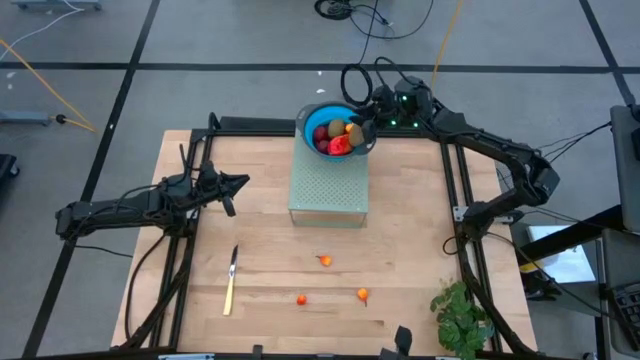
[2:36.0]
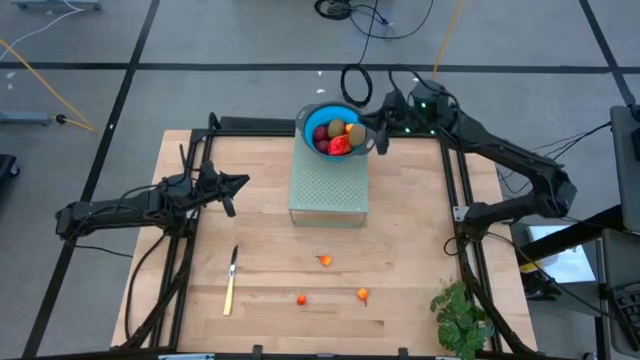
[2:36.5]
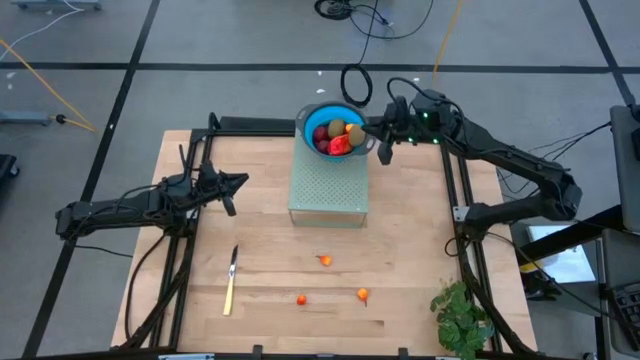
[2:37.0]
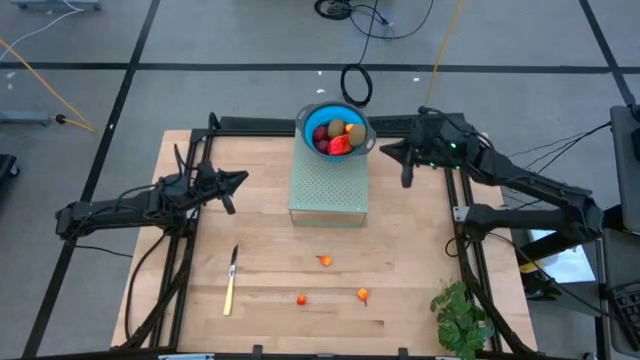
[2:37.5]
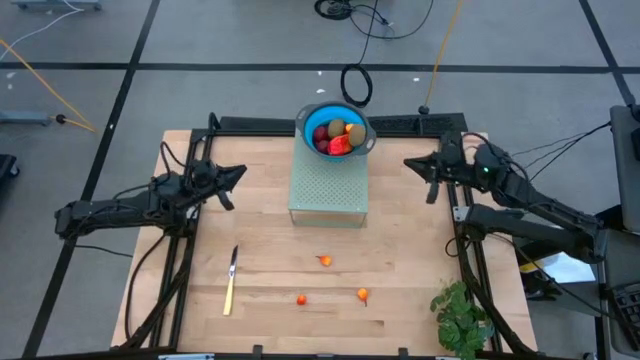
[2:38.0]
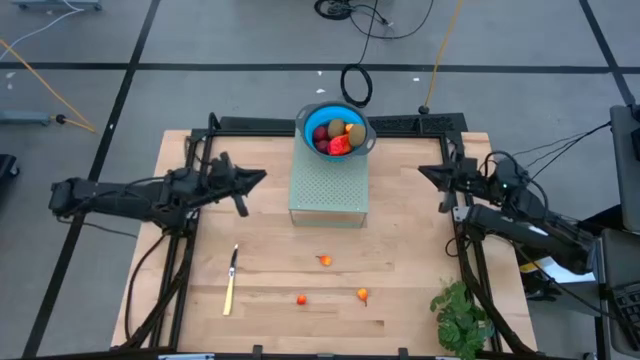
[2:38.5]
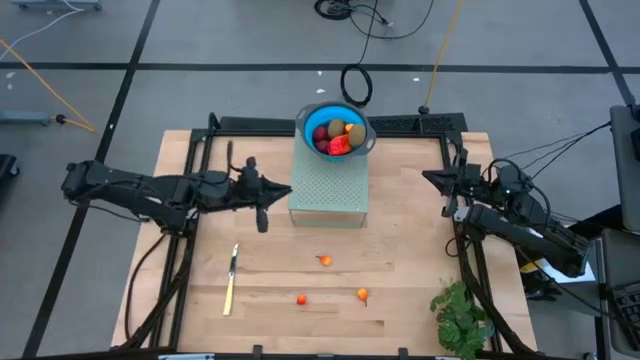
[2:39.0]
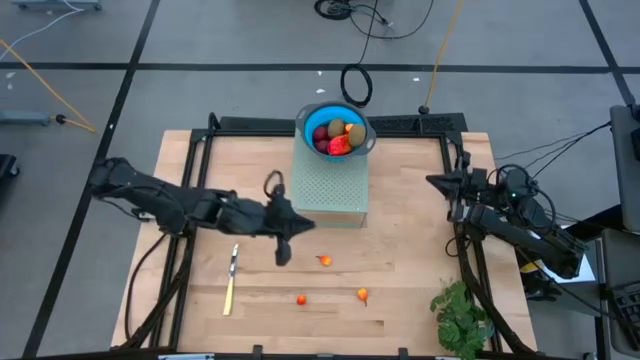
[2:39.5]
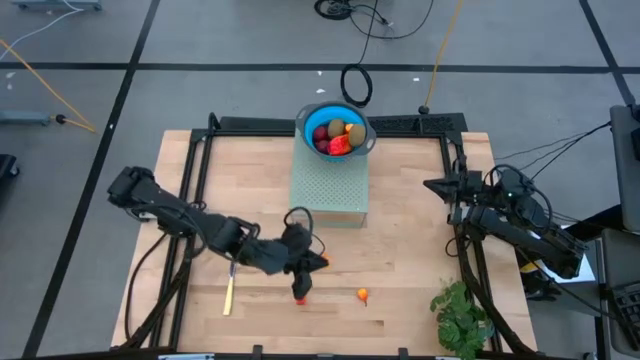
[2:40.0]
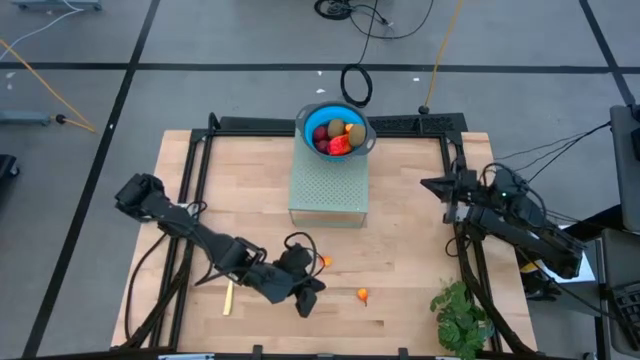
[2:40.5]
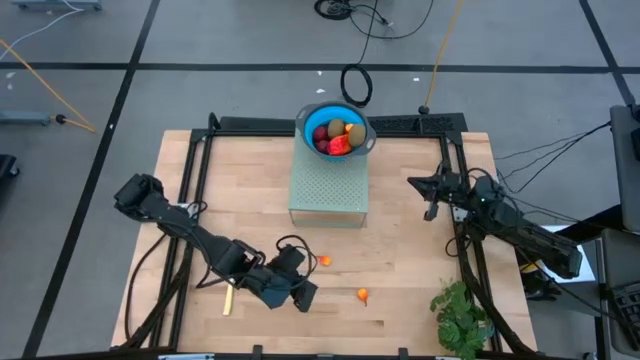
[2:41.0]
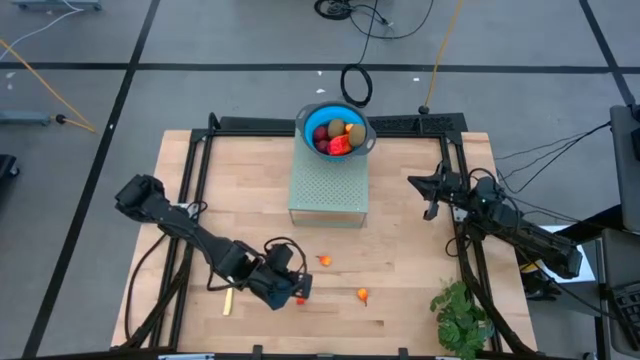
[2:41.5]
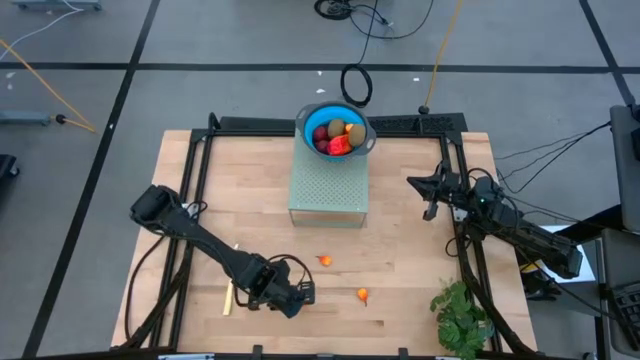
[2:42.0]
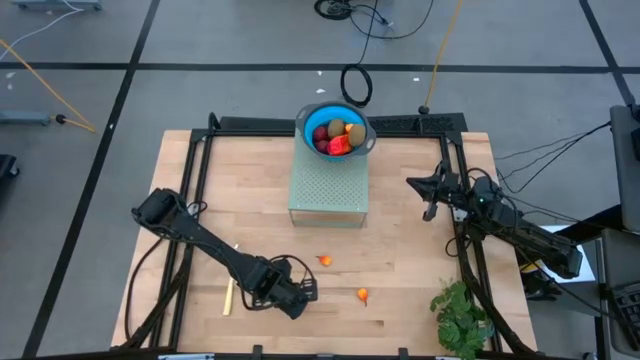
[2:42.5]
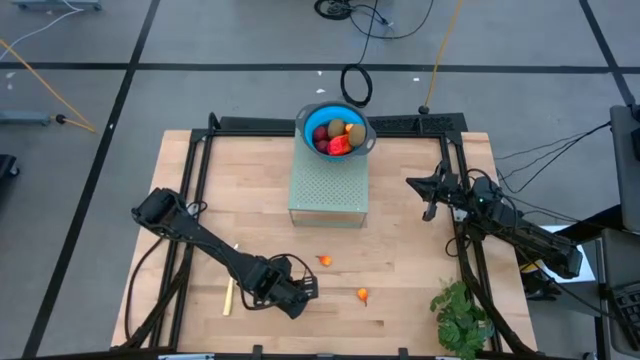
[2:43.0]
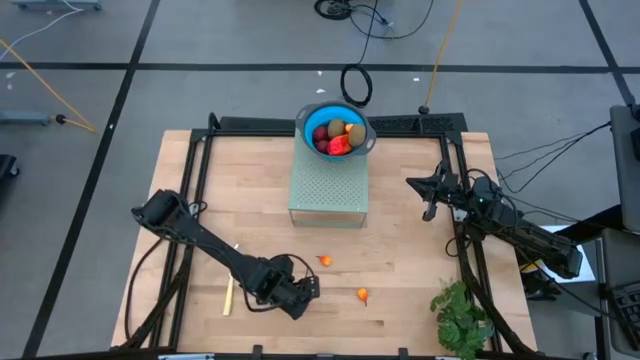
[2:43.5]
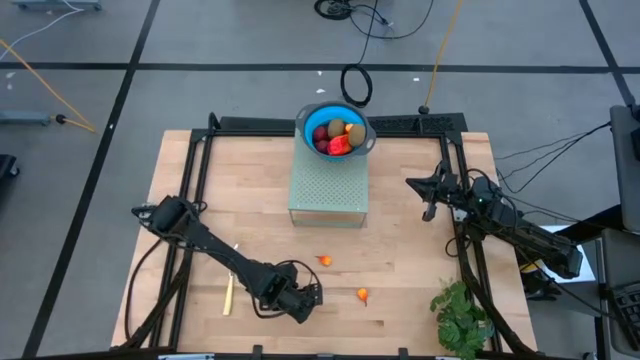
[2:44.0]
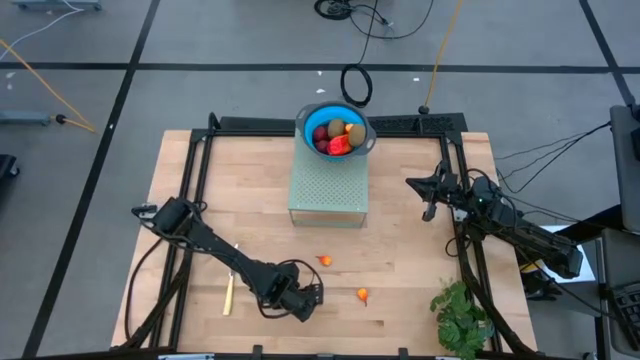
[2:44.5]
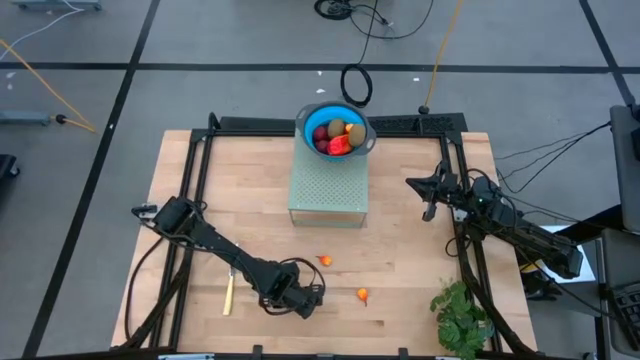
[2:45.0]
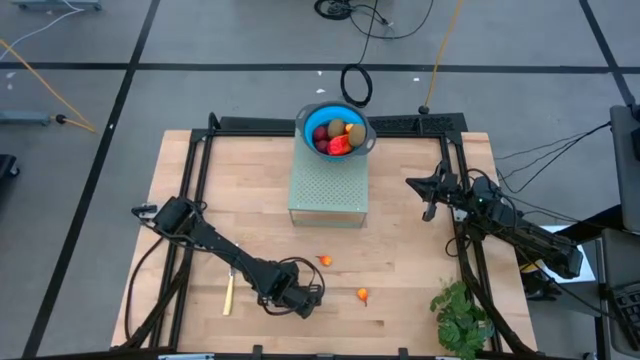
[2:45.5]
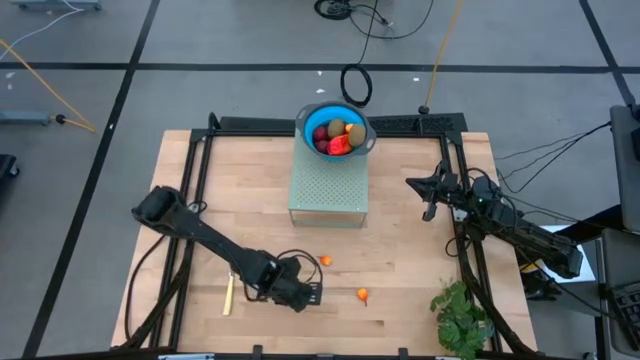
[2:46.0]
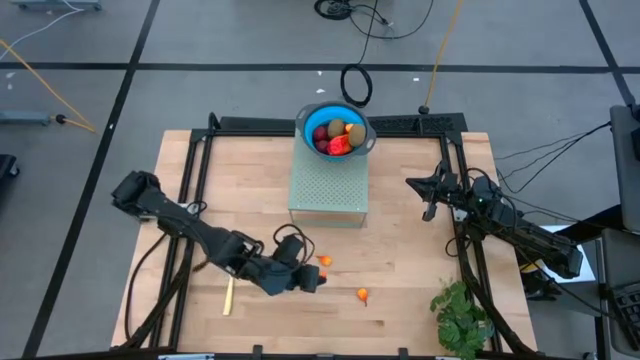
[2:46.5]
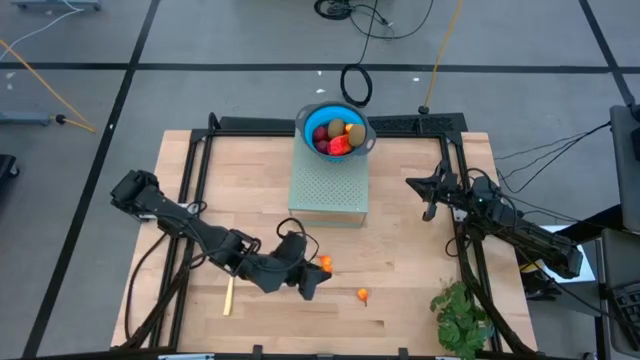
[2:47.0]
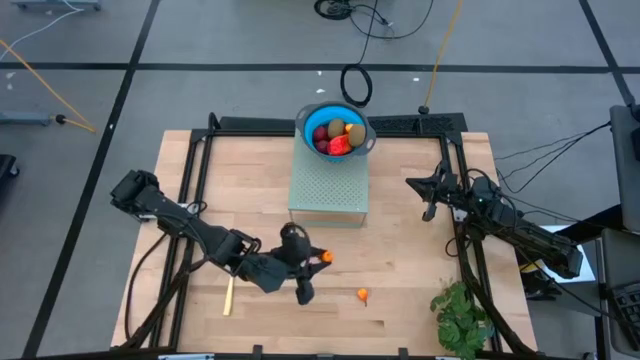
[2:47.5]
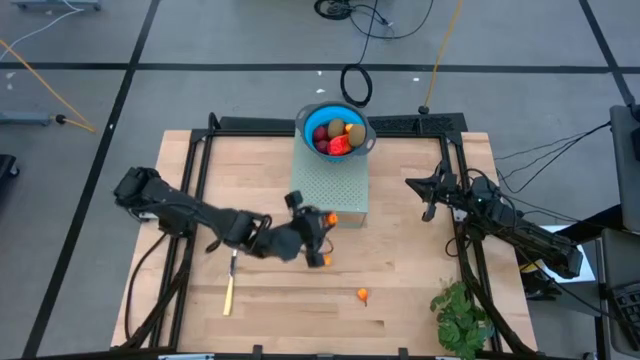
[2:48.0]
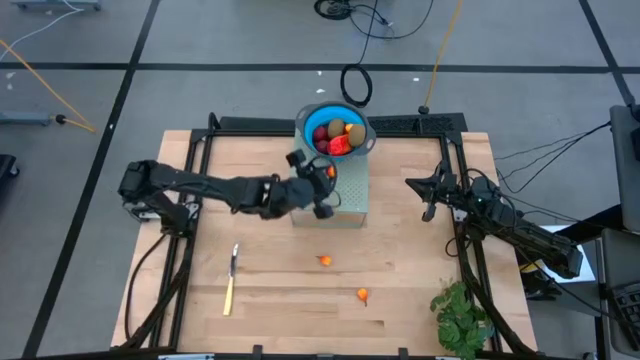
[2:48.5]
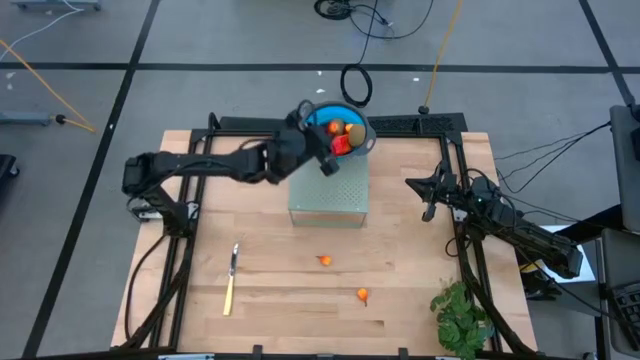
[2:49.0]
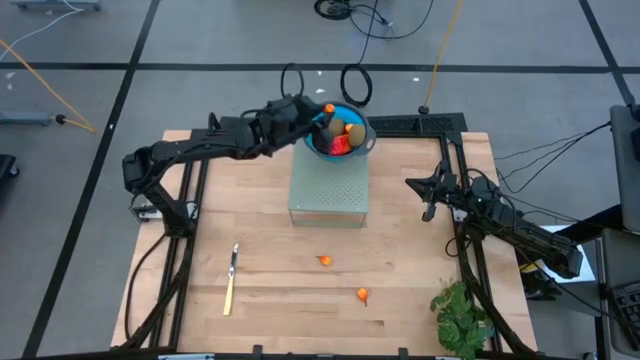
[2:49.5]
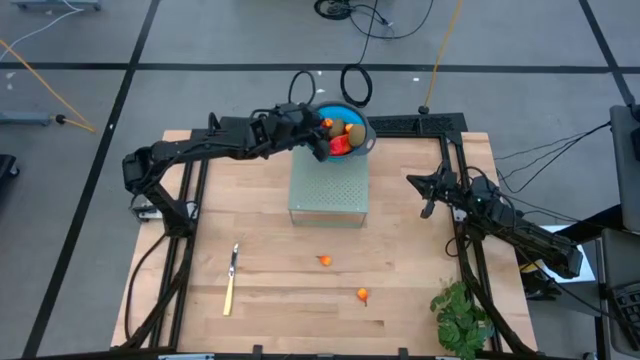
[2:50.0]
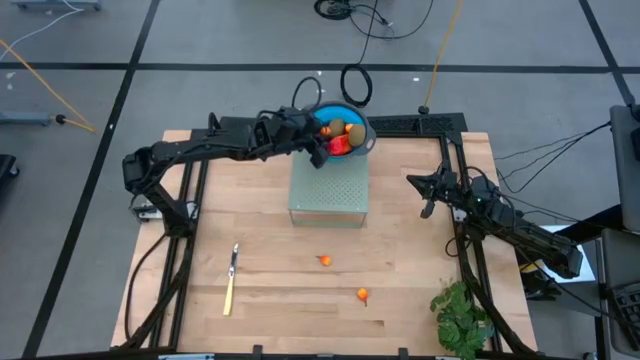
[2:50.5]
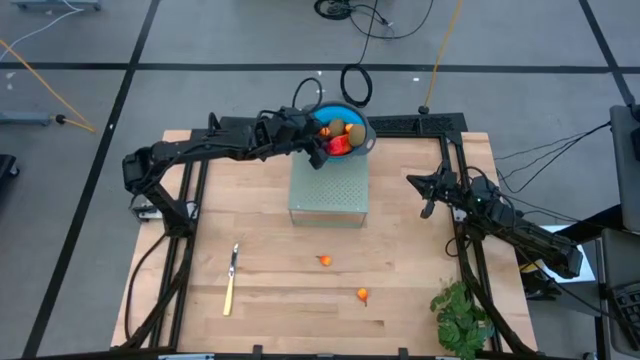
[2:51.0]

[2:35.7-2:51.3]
Task: Pick & Place Fruit
Put the peach into the blue strainer bowl on the shelf

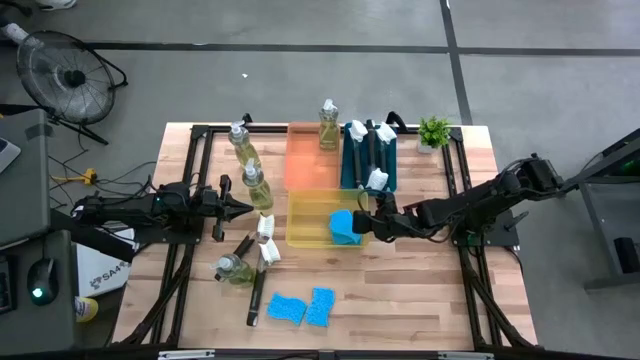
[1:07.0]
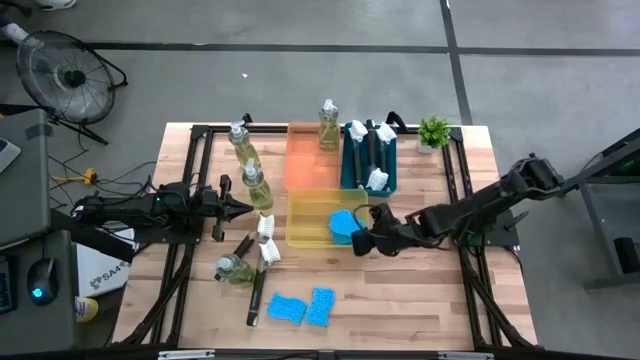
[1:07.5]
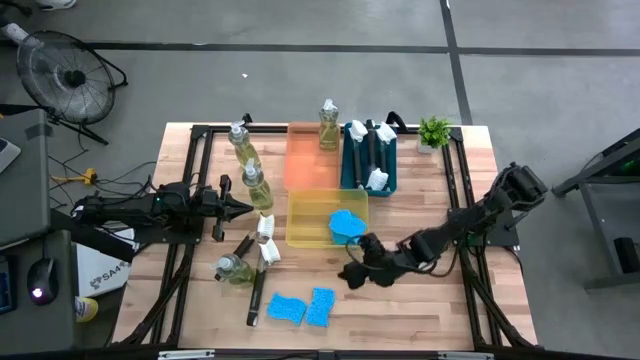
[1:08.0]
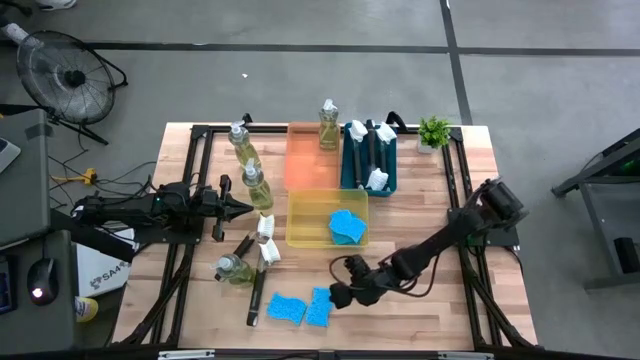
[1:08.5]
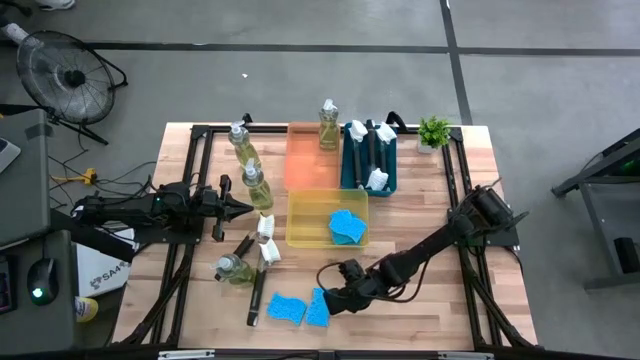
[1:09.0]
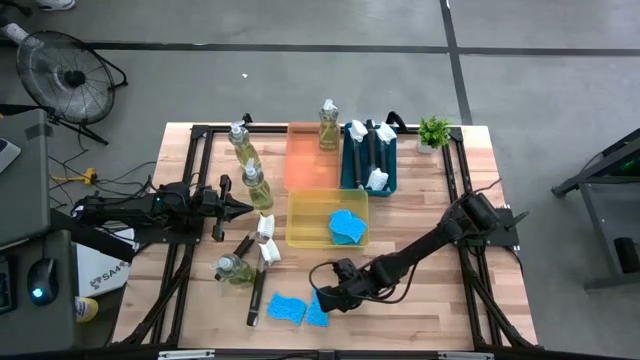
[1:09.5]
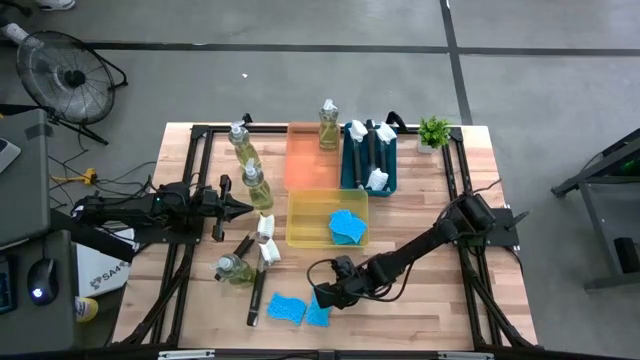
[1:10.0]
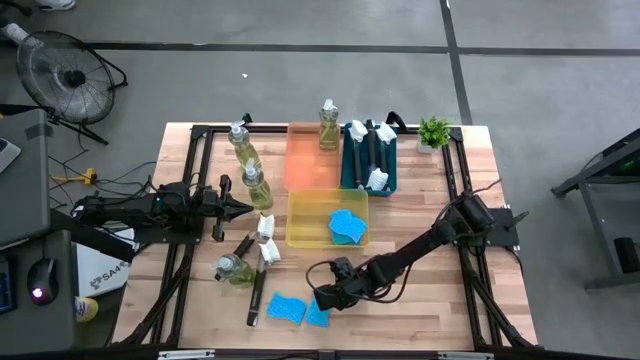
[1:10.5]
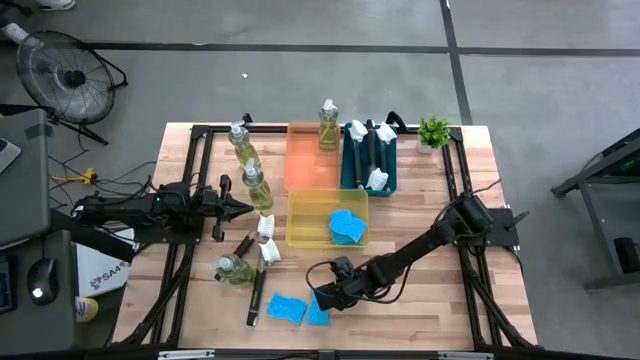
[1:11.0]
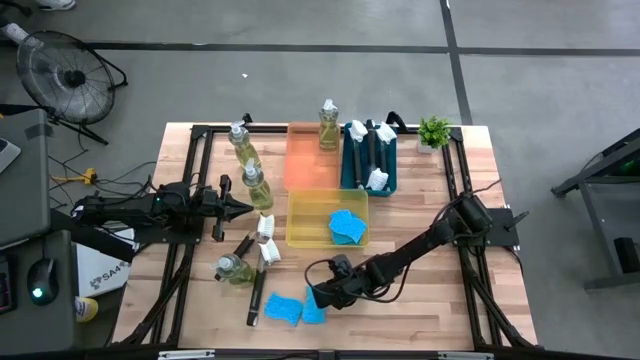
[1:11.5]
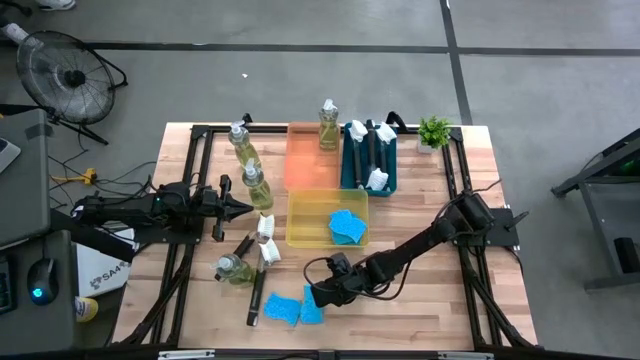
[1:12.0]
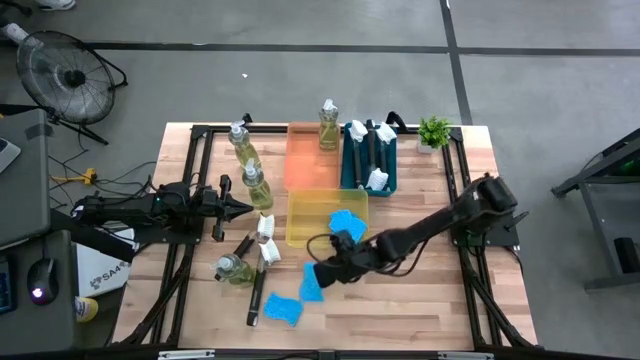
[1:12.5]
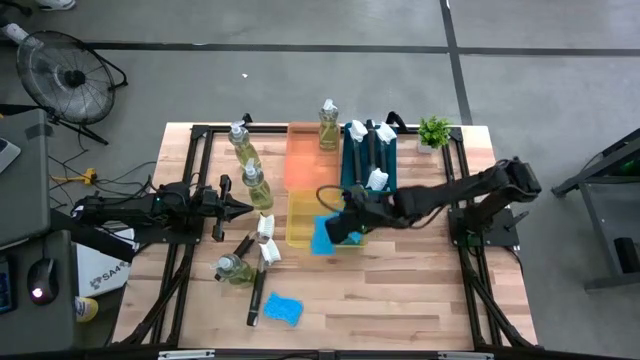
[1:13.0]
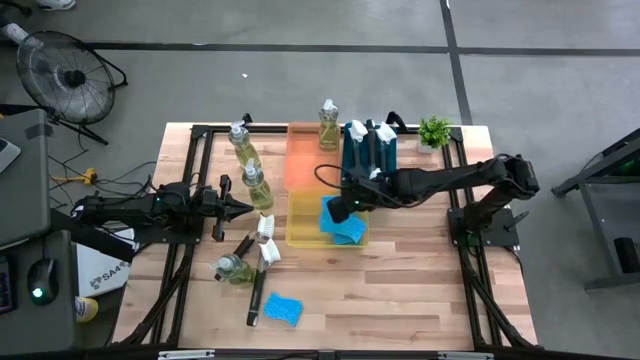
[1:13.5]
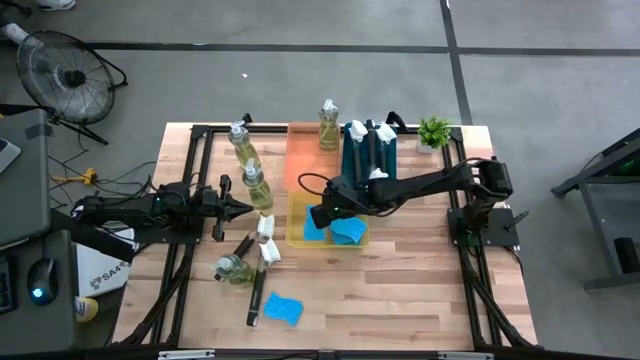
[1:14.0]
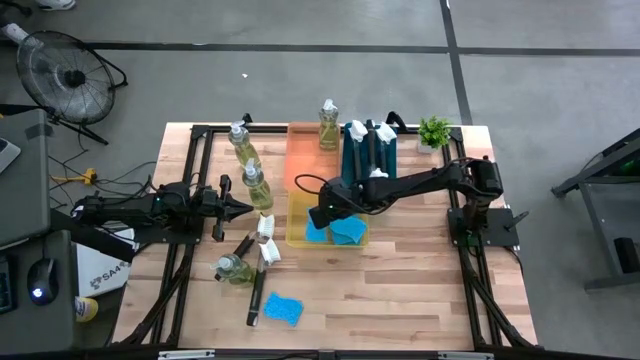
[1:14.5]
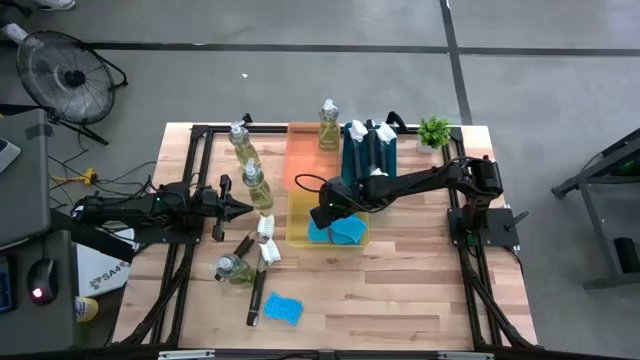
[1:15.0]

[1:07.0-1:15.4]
Task: Pick & Place Kitchen Sink Supplies
Put the sponge into the yellow bin
